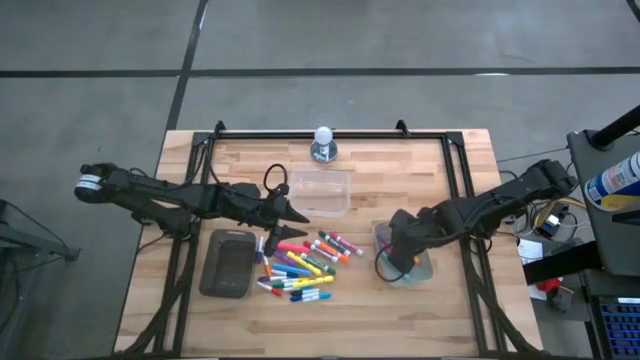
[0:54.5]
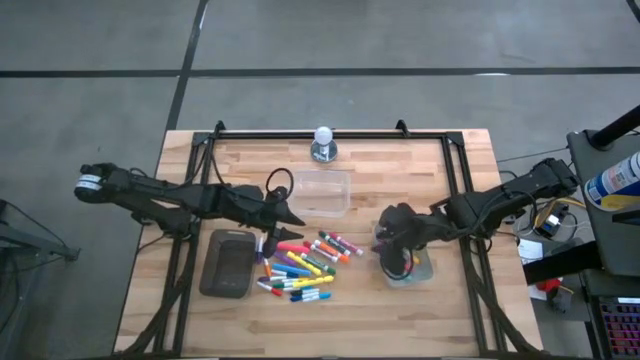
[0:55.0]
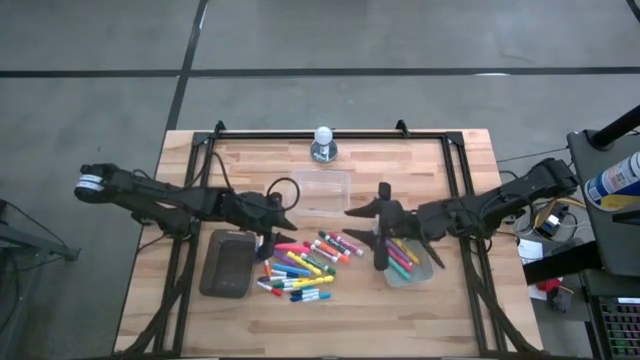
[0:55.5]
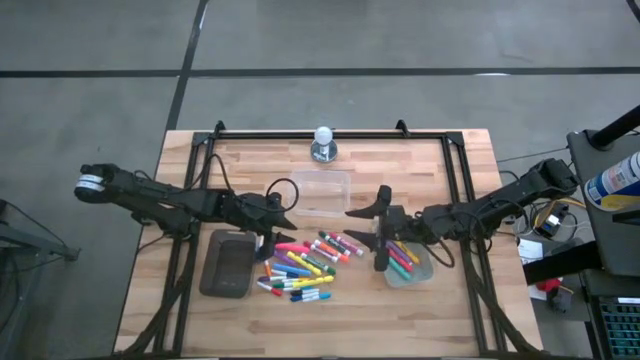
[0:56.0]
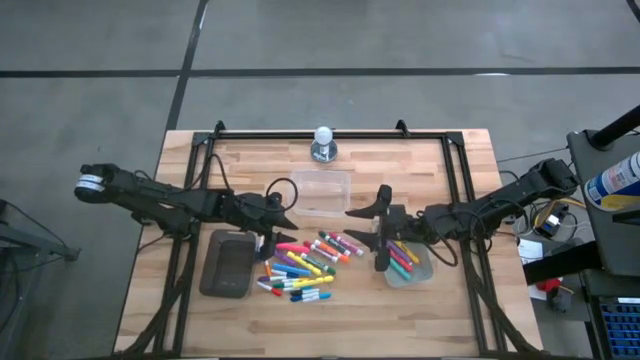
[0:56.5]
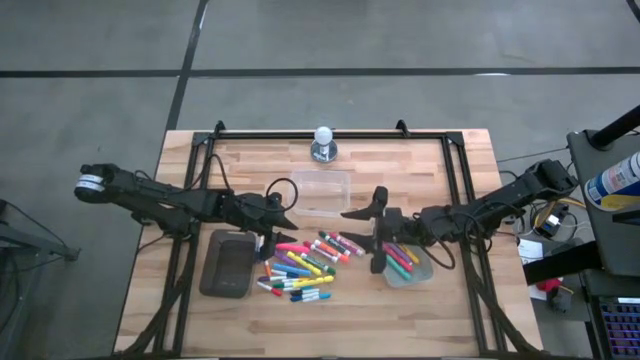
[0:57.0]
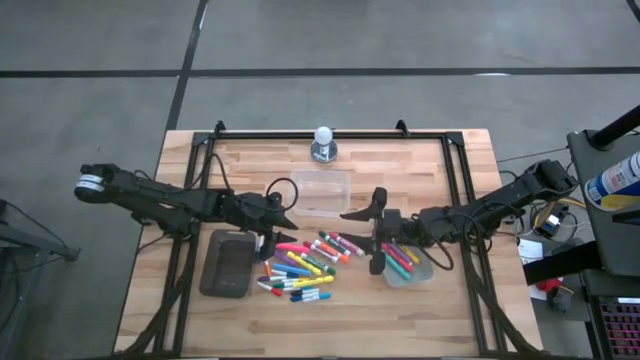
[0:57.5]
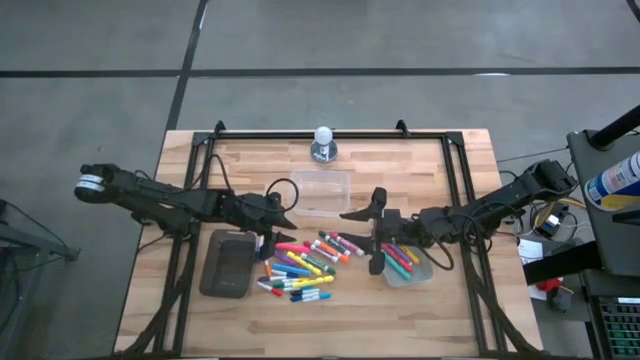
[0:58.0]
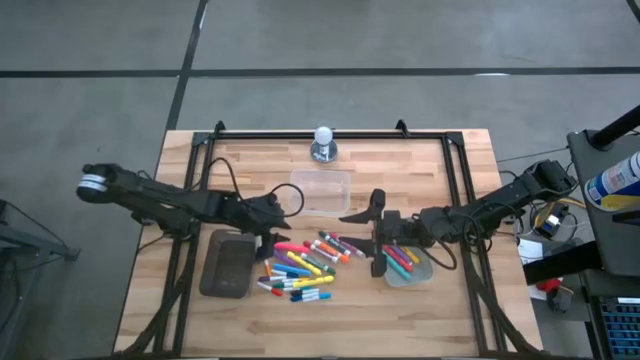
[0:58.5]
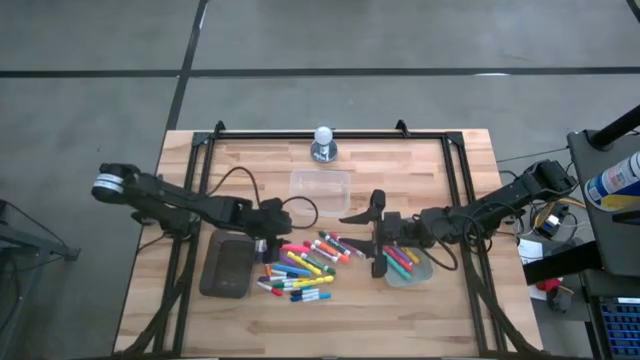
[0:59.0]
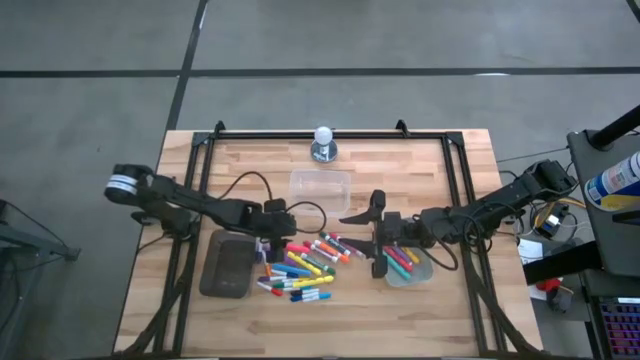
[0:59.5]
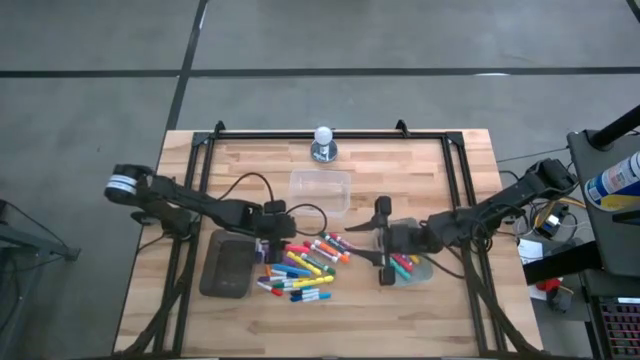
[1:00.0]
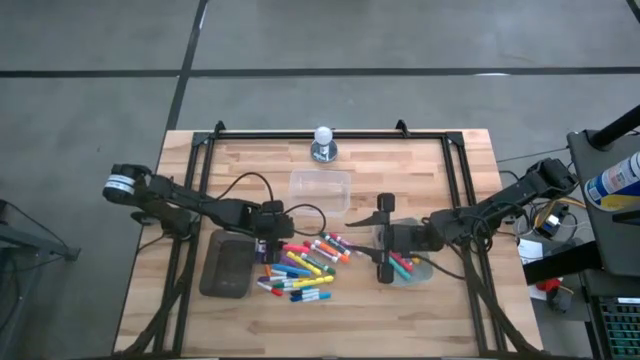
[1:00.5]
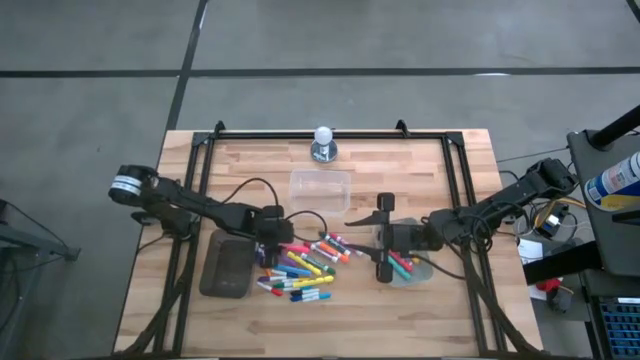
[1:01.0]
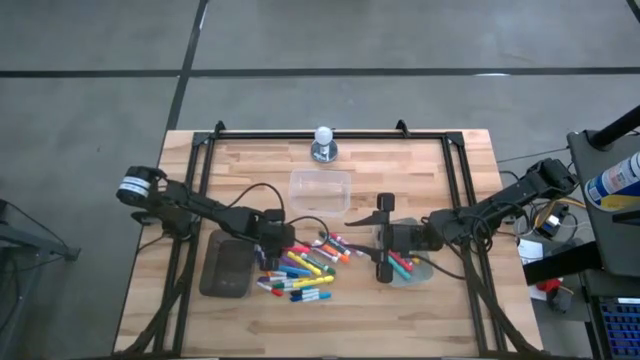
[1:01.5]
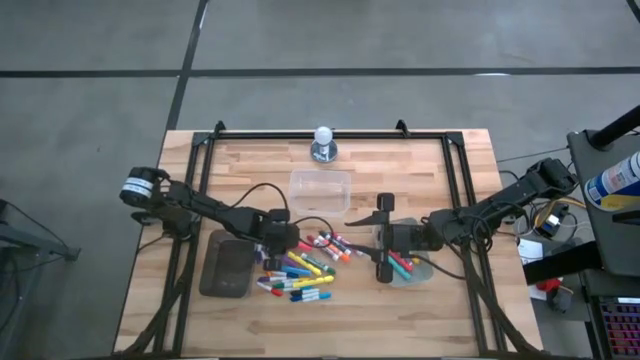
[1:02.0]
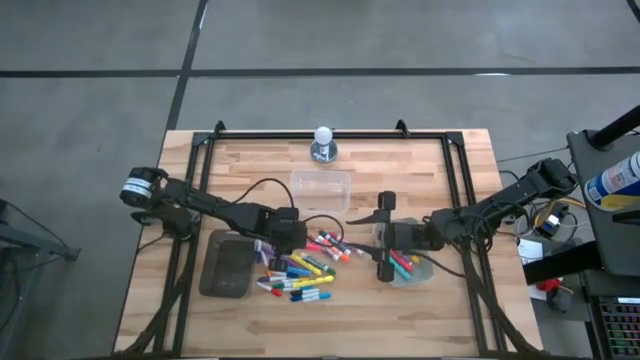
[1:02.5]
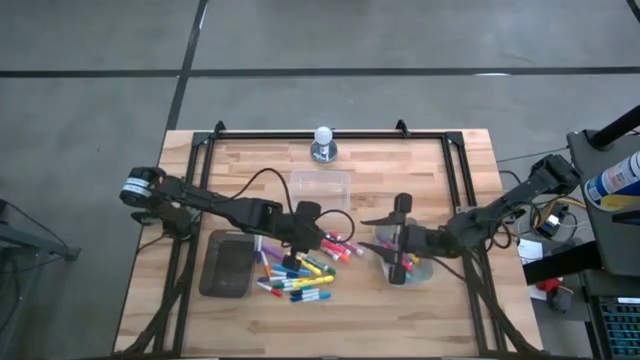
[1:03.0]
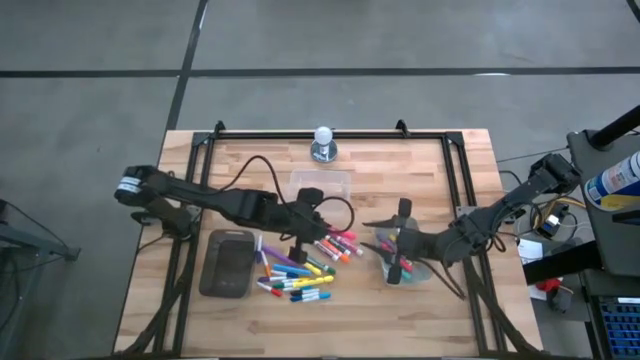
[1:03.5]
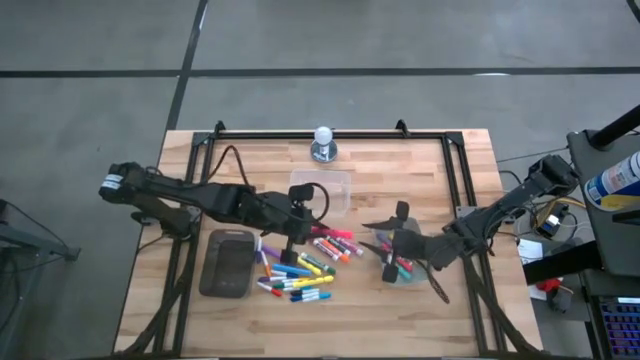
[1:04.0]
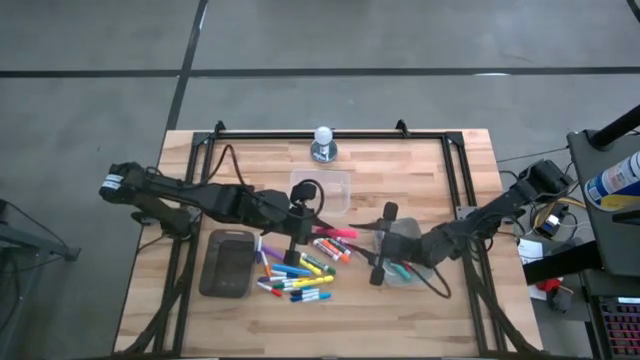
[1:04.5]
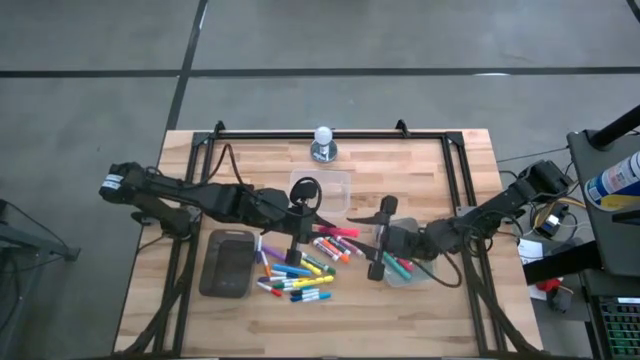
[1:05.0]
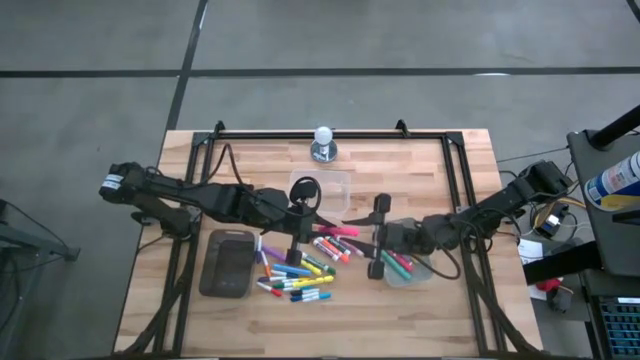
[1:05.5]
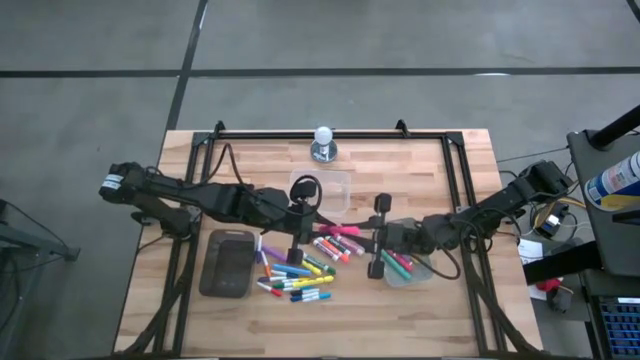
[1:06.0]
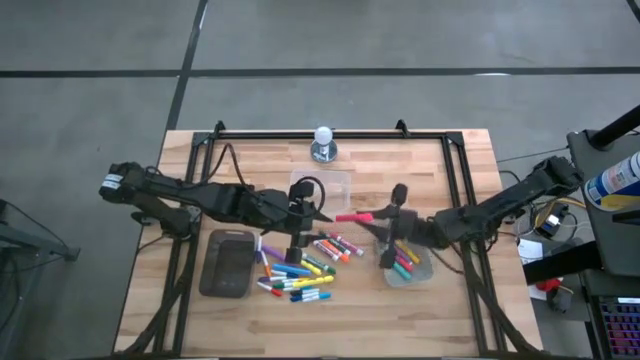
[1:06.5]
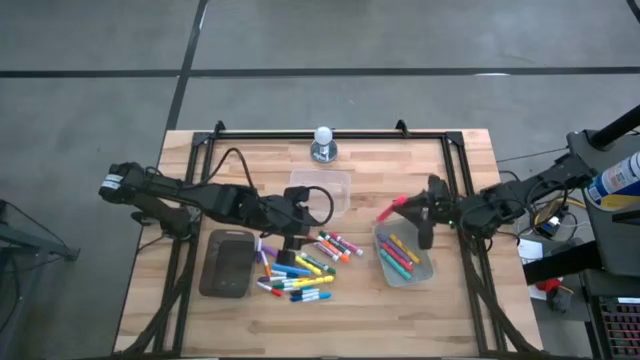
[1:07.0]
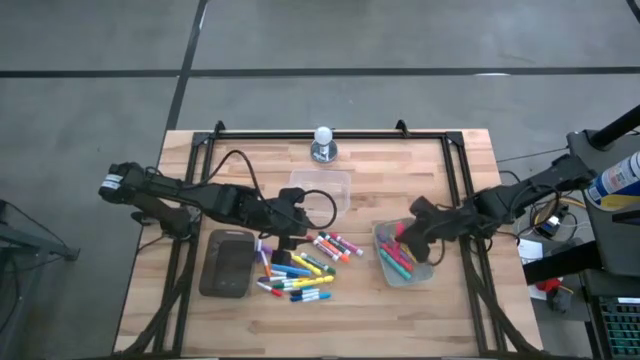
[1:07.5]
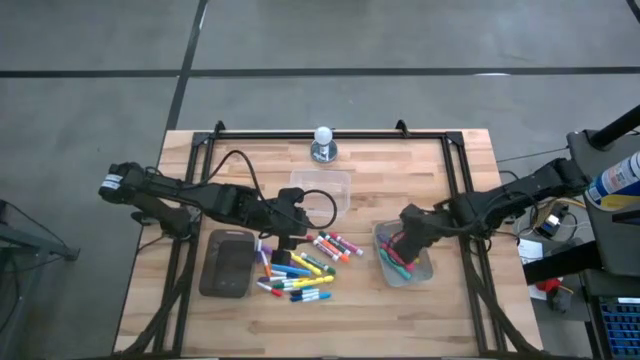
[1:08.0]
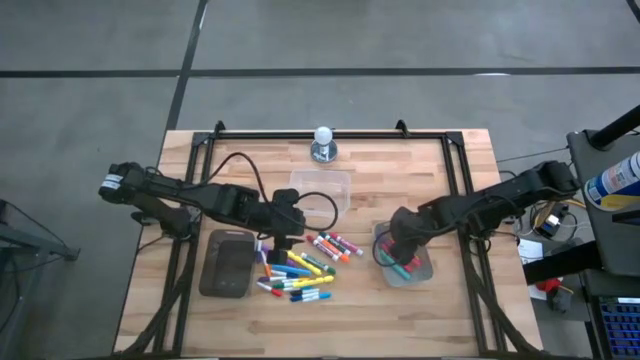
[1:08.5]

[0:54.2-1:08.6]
Task: Pick & Place Markers
Put the pink highlighter into the gray bin

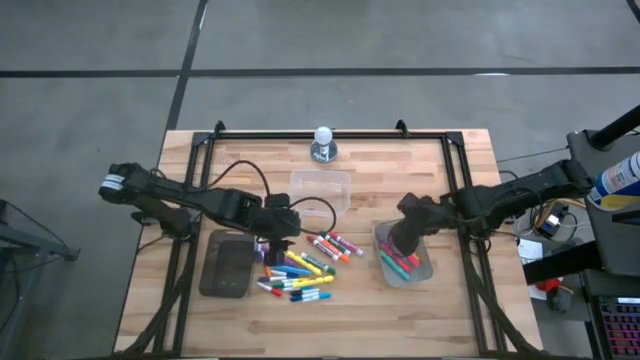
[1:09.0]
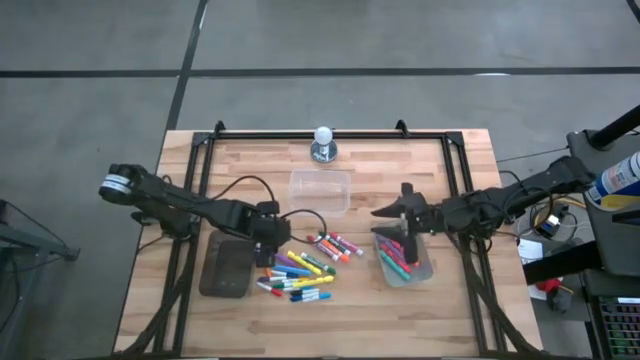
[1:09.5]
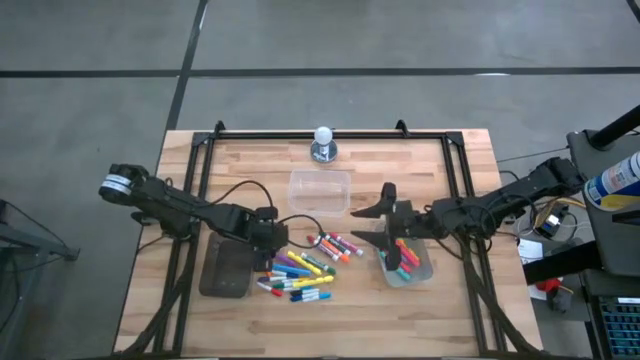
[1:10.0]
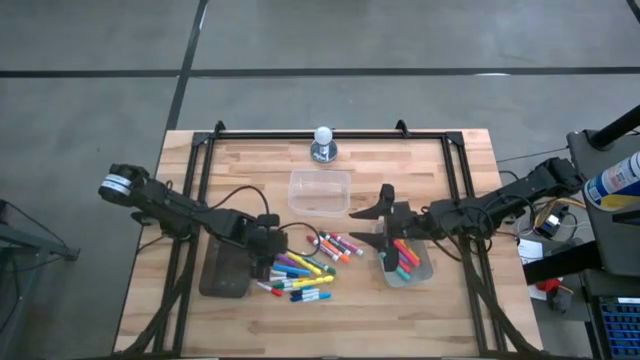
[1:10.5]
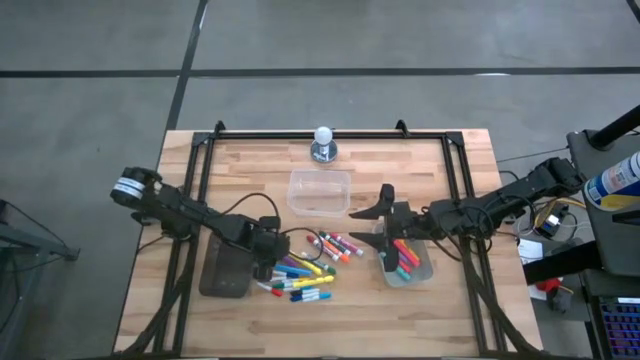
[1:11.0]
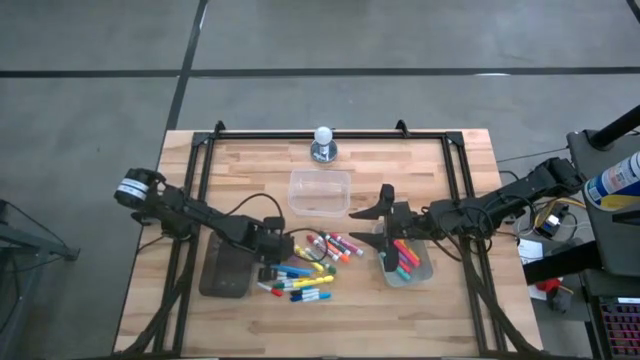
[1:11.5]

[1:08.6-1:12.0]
Put the purple highlighter into the gray bin

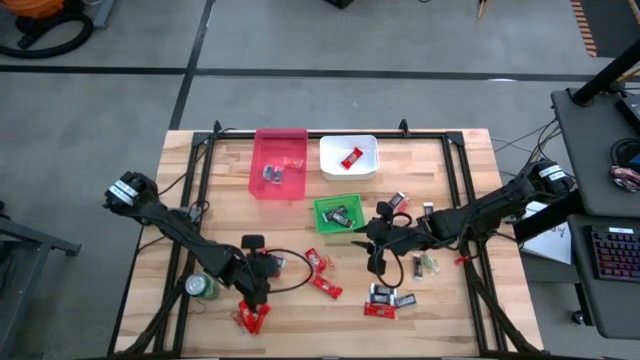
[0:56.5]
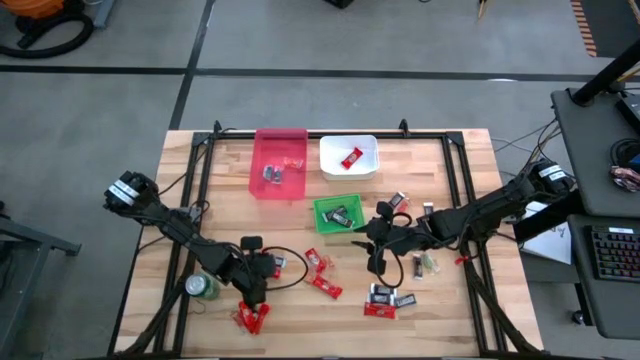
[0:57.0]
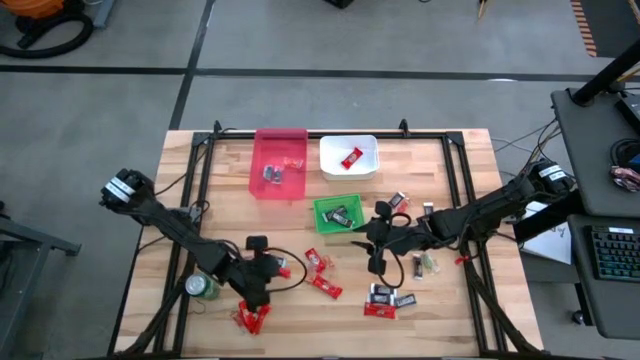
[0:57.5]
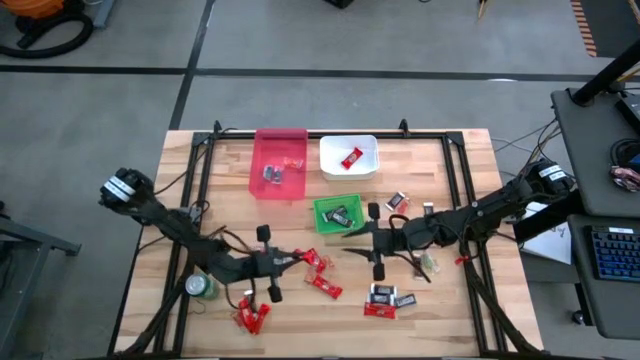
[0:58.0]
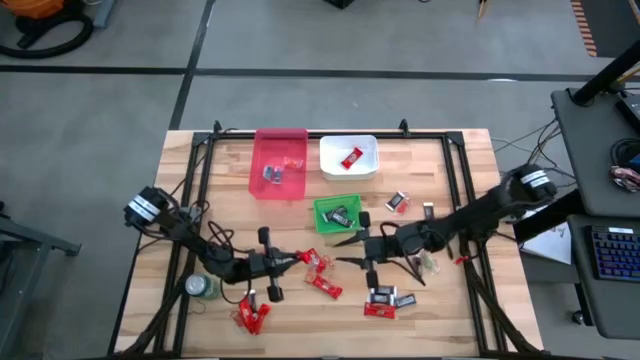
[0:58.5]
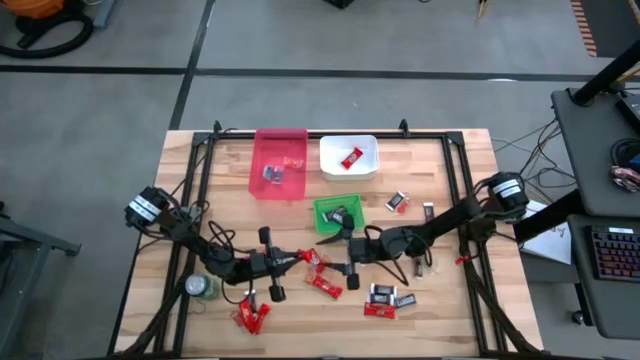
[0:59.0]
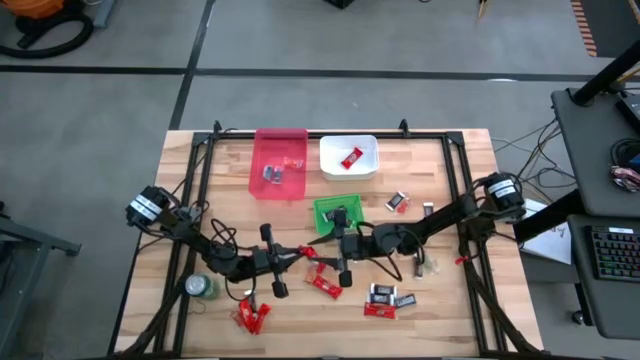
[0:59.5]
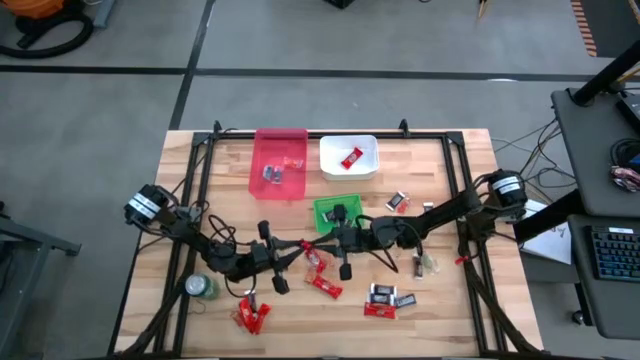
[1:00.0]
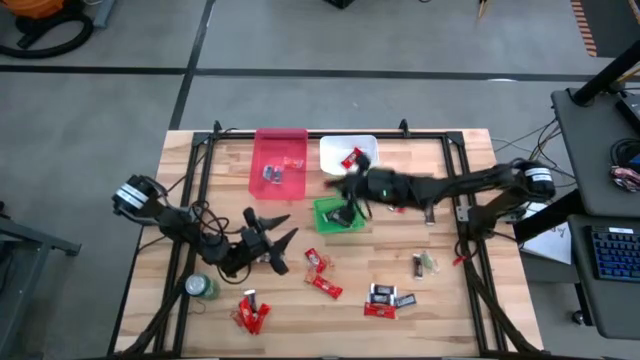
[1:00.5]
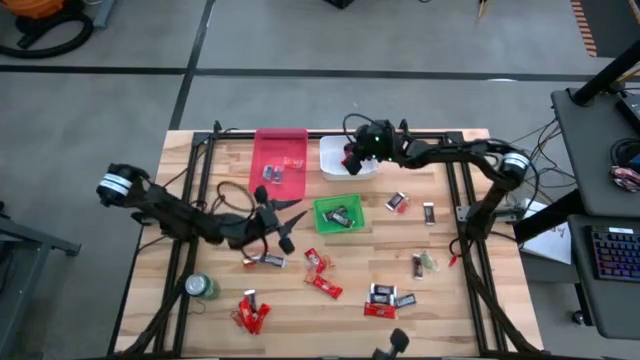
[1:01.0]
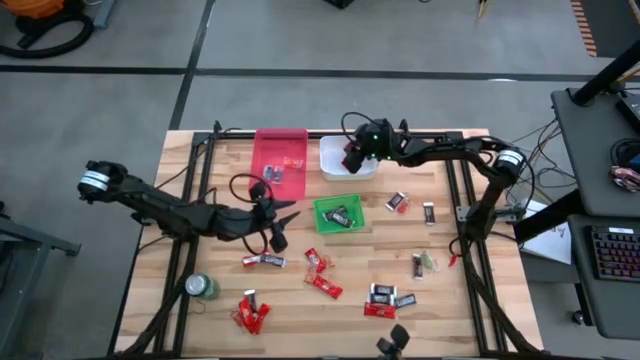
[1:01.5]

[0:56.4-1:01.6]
Task: Sort candy
Put the red chocolate bar into the white bin
